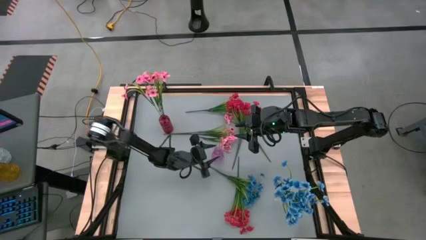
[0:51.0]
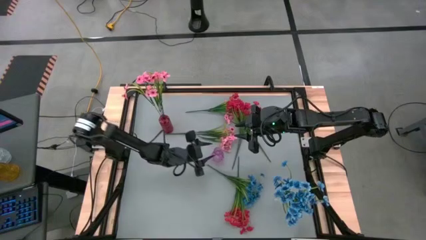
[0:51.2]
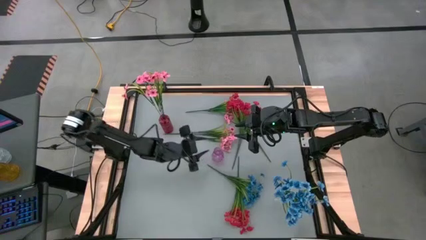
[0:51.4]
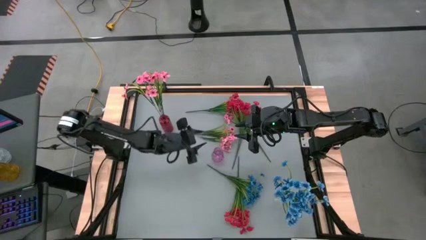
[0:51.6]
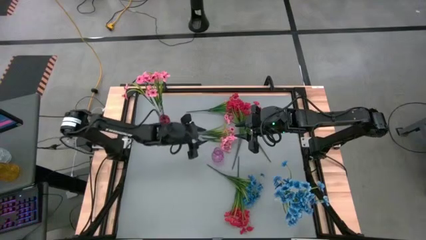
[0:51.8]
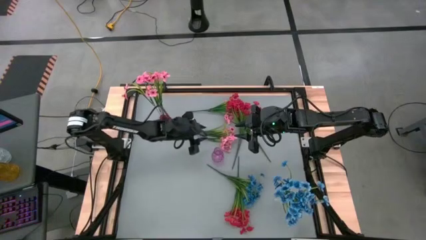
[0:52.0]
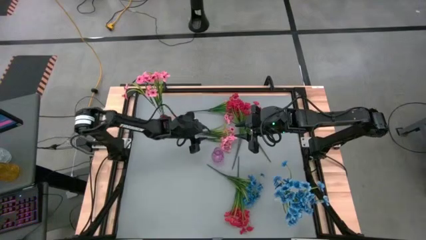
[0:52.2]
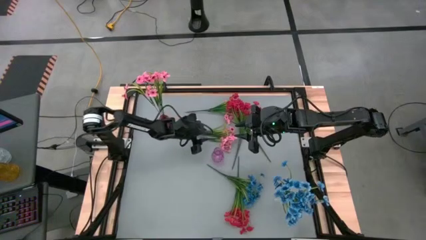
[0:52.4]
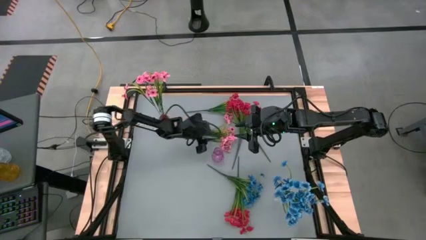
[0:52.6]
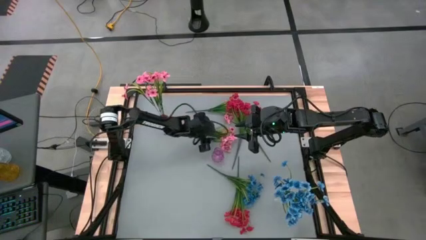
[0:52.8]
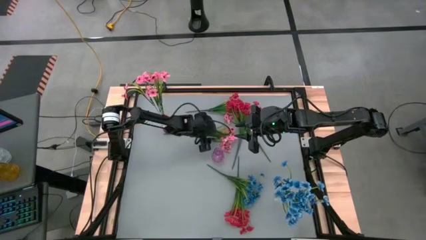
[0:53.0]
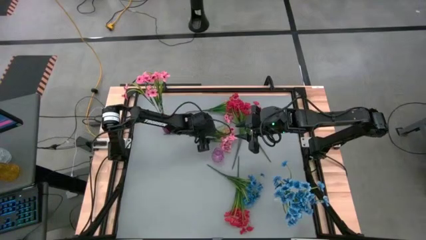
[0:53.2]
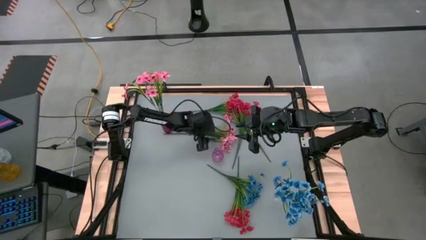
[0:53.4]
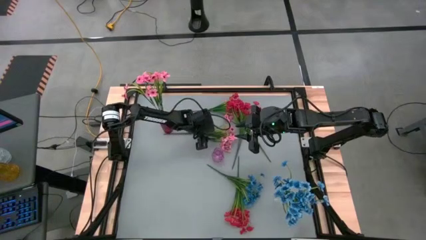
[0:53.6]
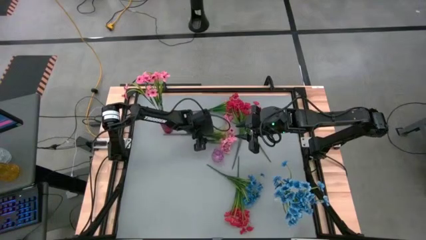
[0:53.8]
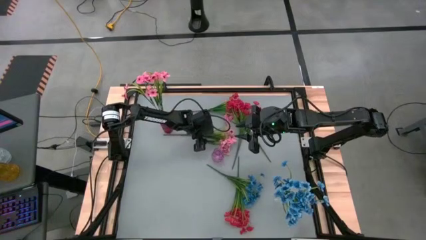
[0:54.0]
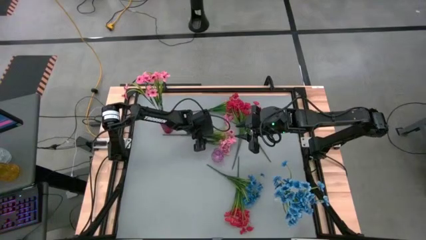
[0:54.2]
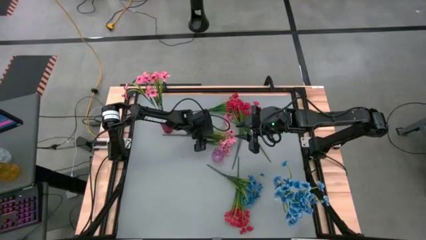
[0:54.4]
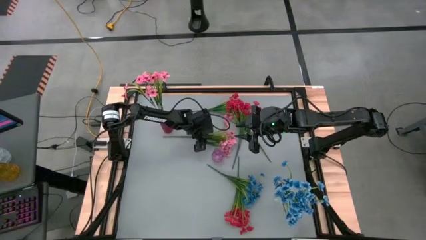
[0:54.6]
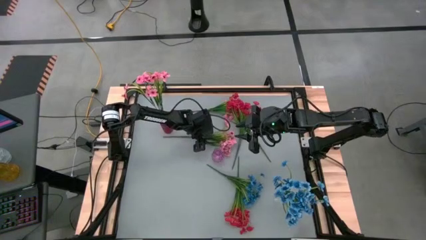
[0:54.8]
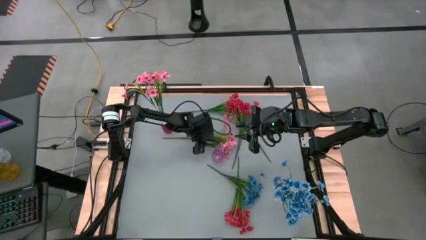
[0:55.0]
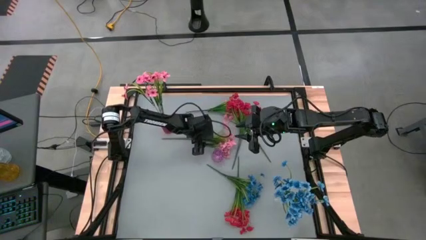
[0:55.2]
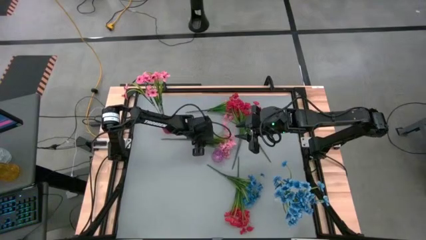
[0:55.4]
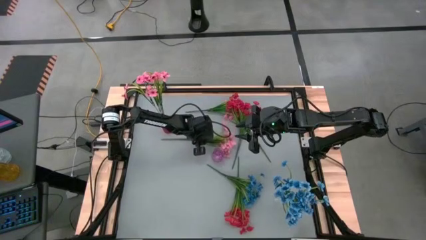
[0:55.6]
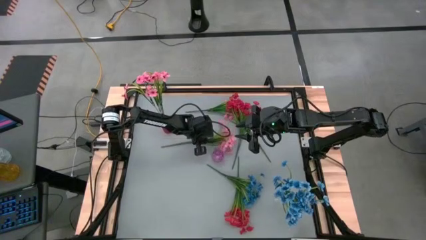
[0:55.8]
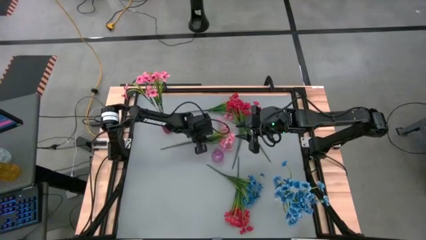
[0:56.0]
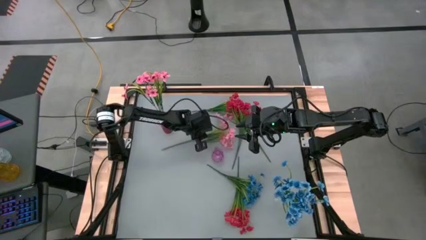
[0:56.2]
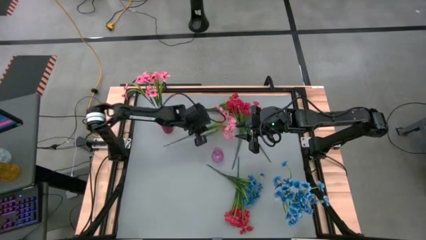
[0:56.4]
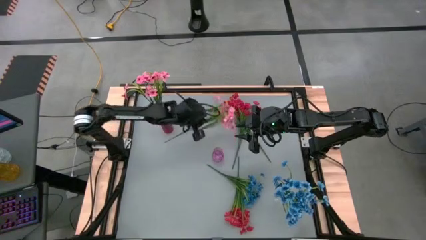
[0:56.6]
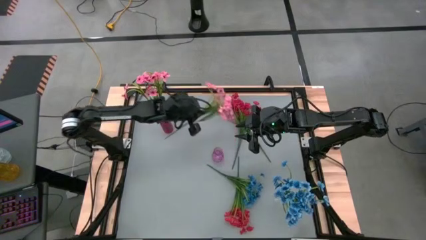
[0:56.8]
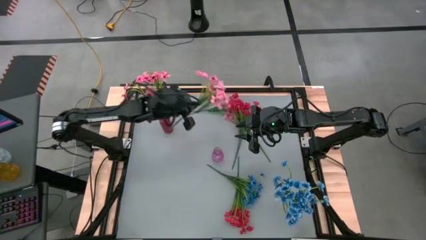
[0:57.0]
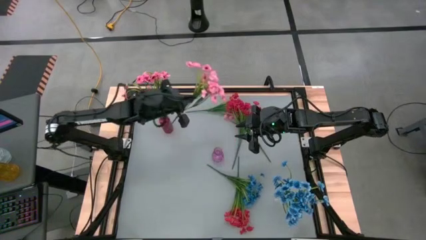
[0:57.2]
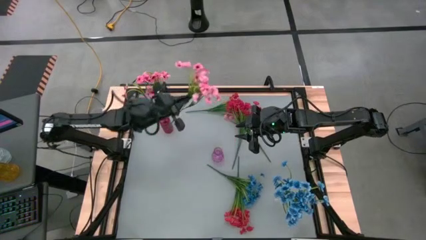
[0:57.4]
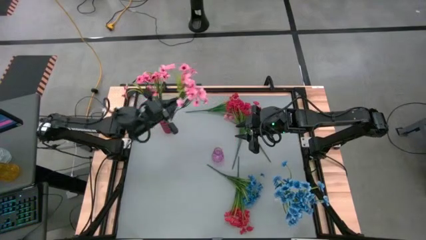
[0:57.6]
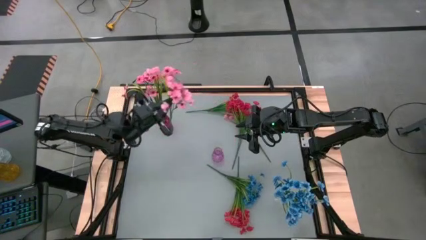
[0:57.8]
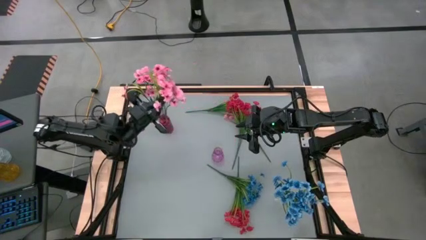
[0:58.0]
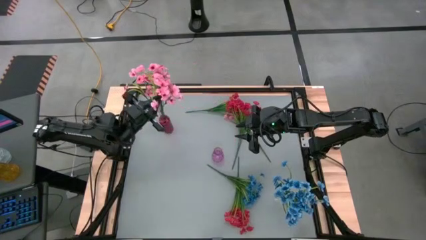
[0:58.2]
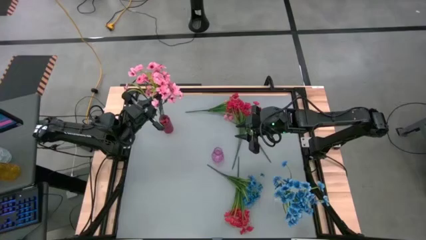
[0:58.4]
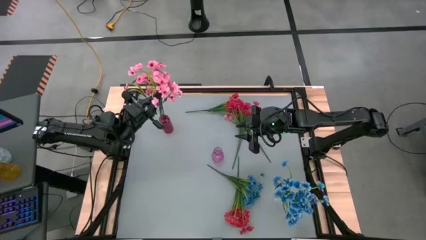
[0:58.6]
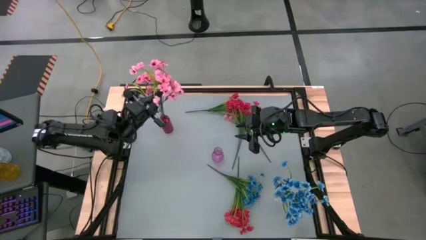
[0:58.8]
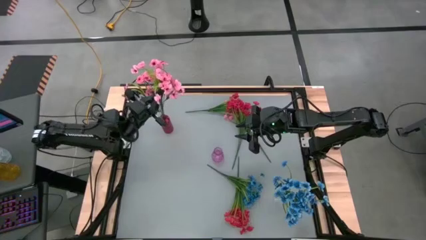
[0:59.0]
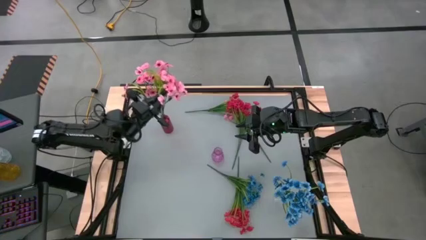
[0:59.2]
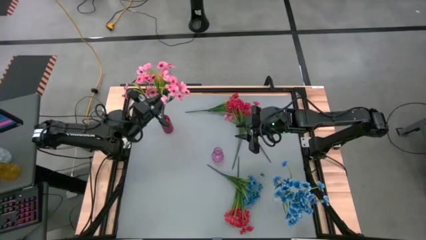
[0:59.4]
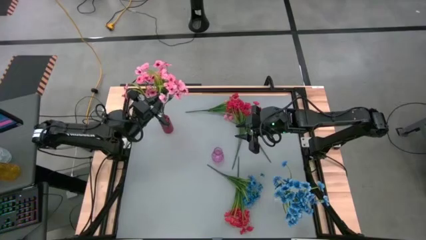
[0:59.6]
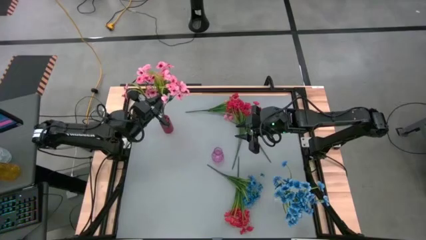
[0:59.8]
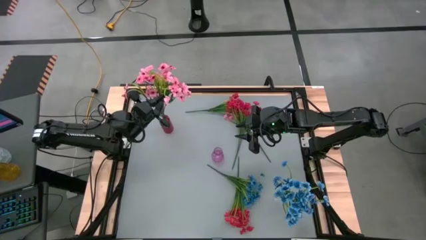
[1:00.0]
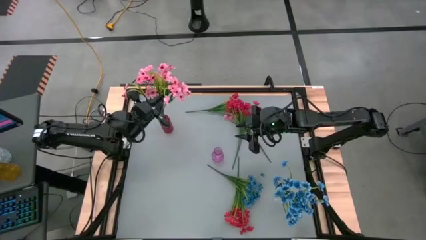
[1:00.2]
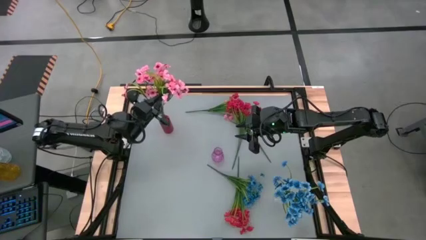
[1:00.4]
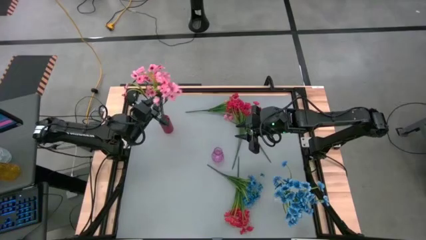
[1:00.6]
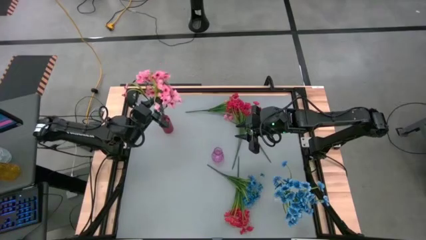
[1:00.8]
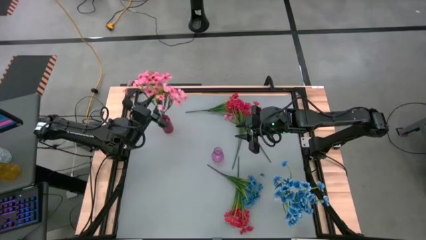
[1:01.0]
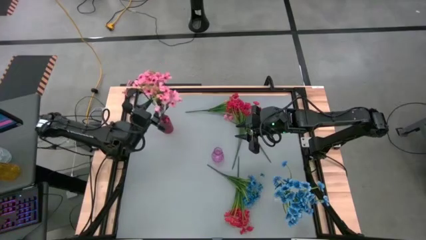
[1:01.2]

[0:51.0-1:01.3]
Task: Sort flowers into vase by color
Put the pink flowers into the red vase
